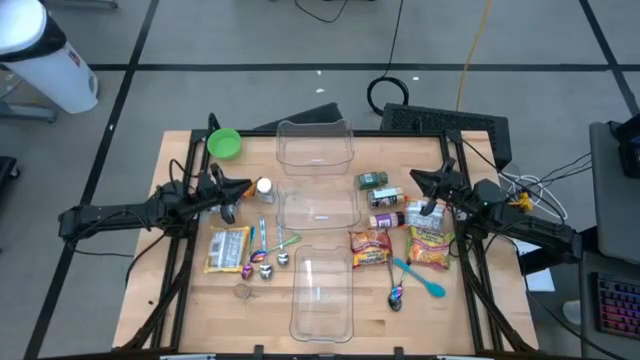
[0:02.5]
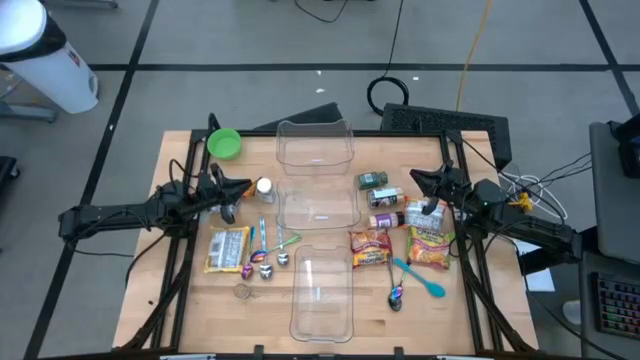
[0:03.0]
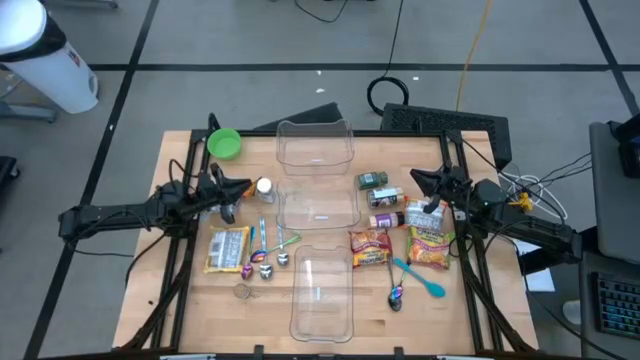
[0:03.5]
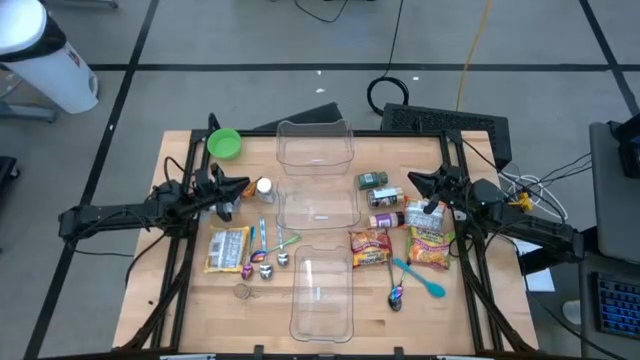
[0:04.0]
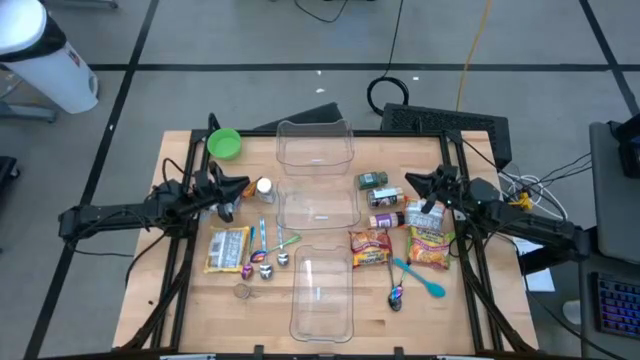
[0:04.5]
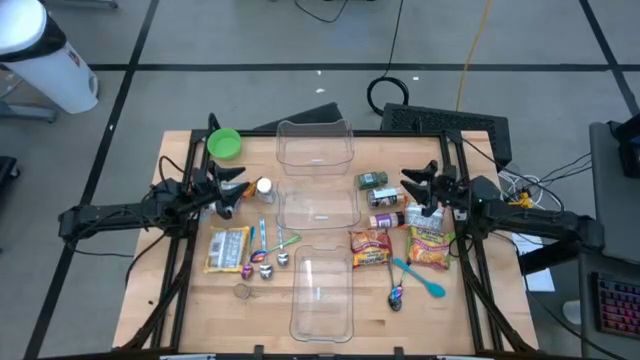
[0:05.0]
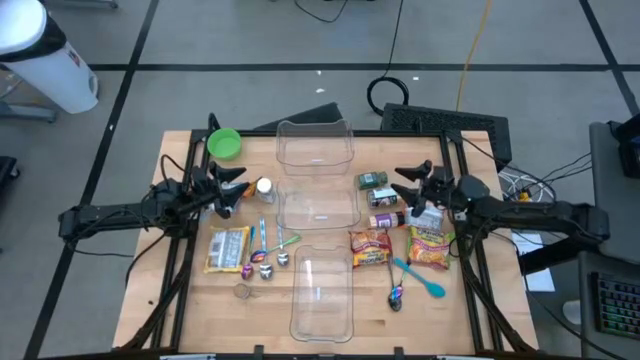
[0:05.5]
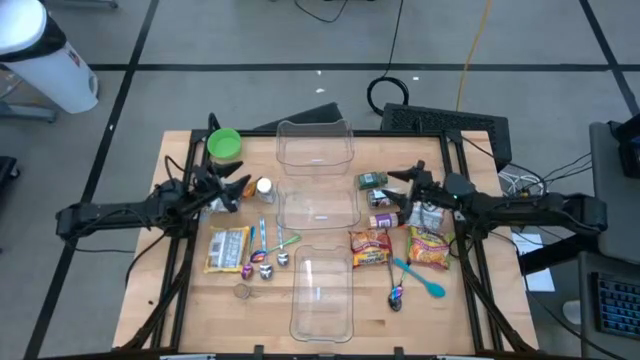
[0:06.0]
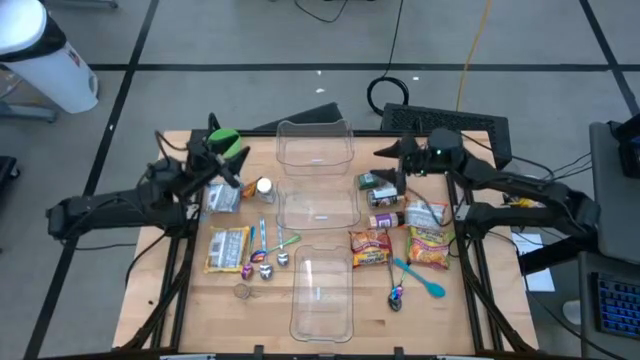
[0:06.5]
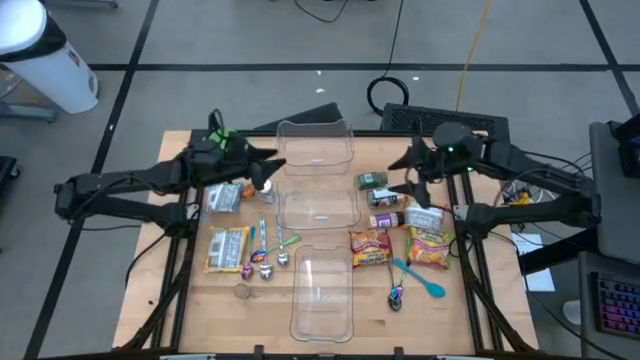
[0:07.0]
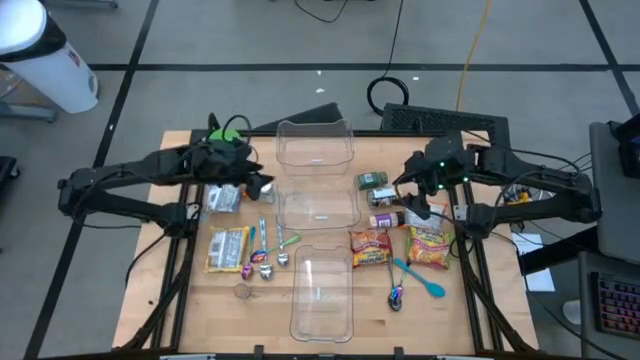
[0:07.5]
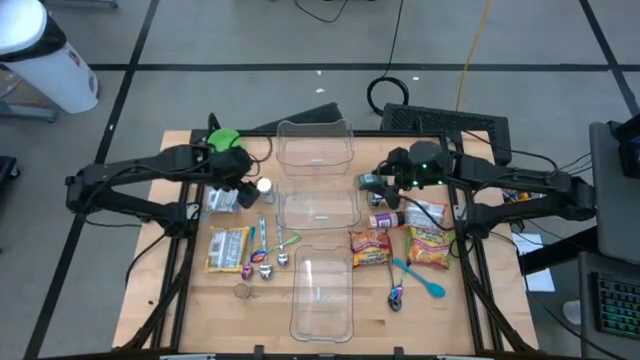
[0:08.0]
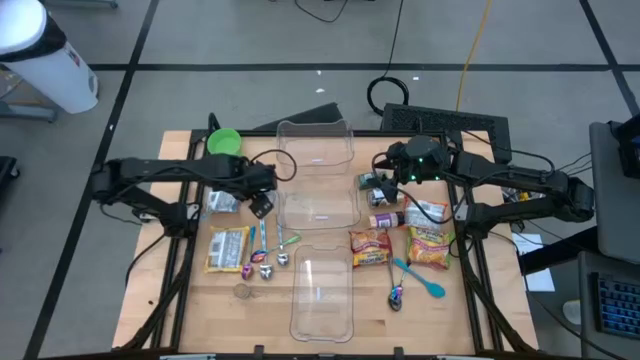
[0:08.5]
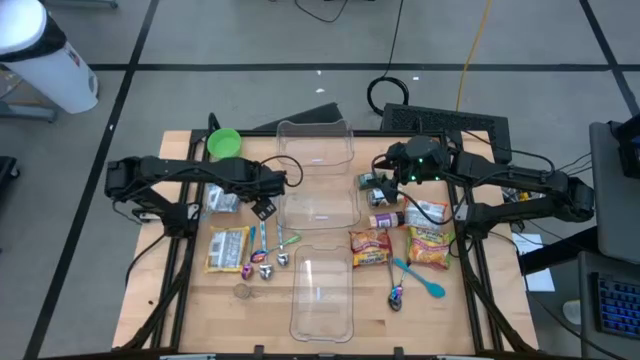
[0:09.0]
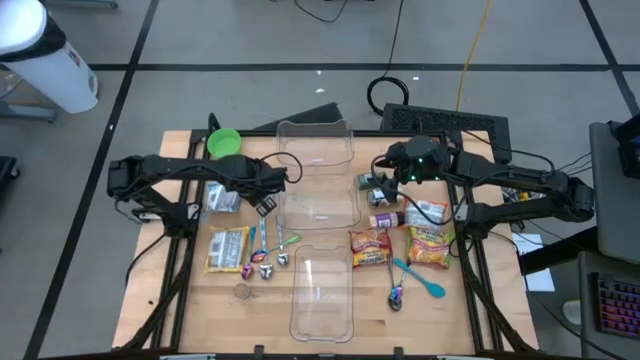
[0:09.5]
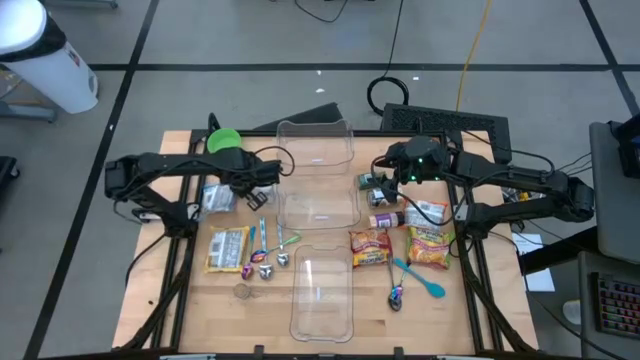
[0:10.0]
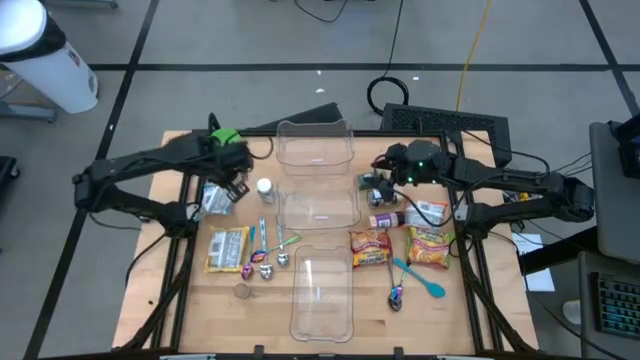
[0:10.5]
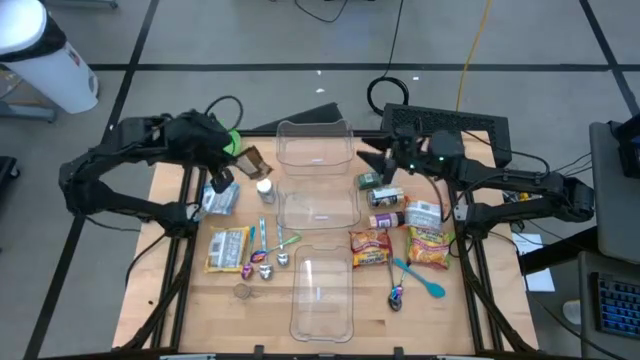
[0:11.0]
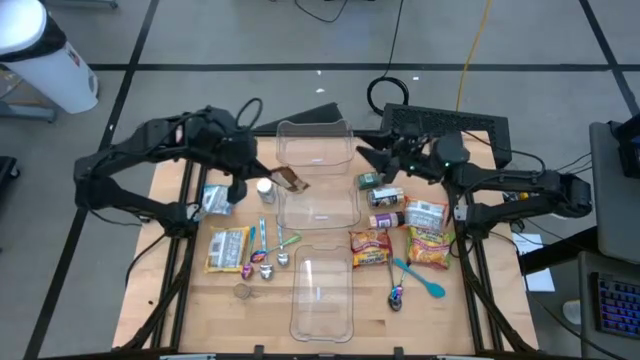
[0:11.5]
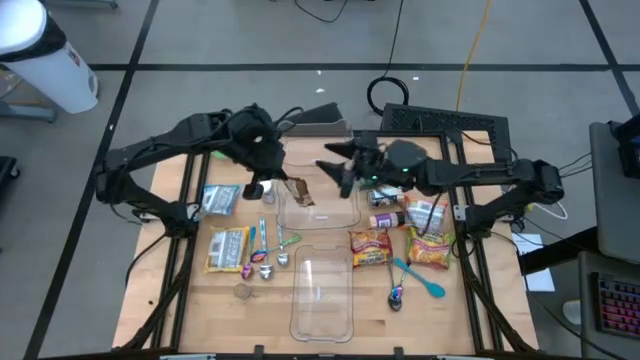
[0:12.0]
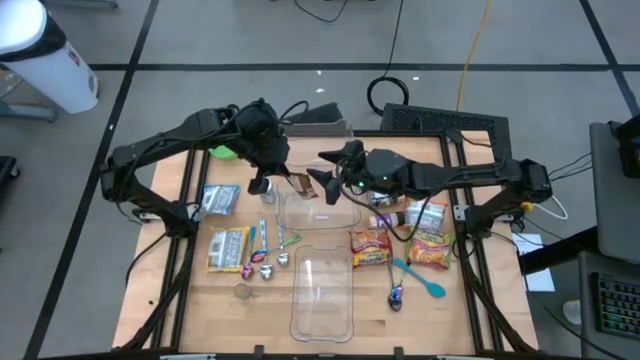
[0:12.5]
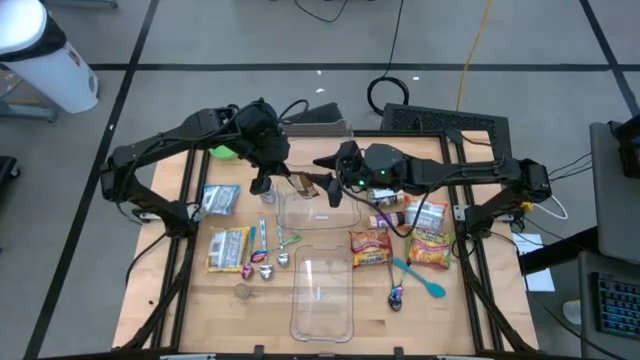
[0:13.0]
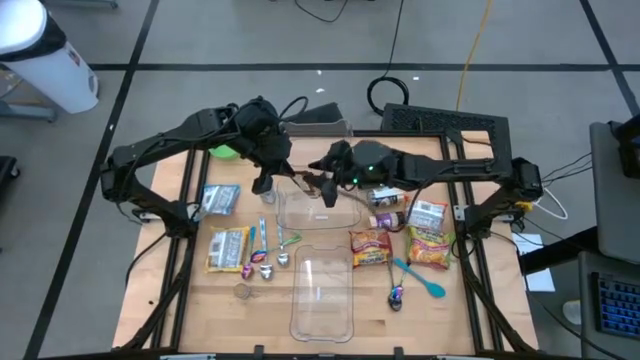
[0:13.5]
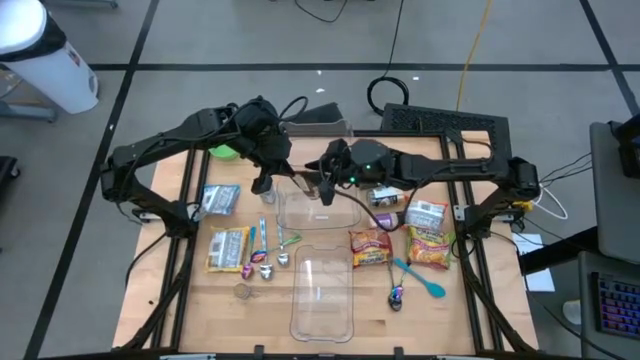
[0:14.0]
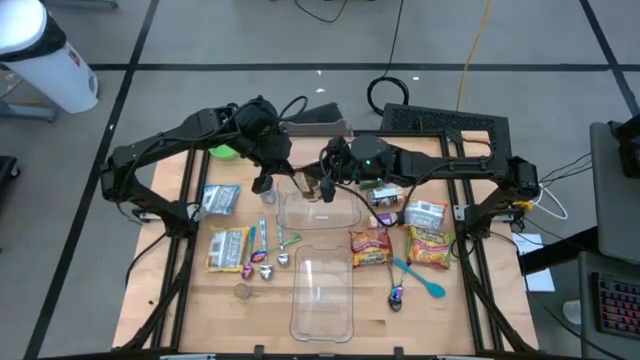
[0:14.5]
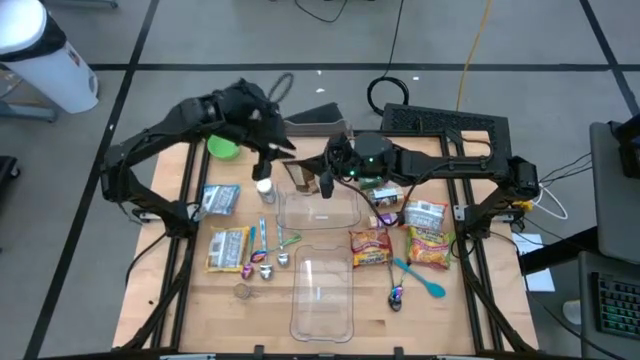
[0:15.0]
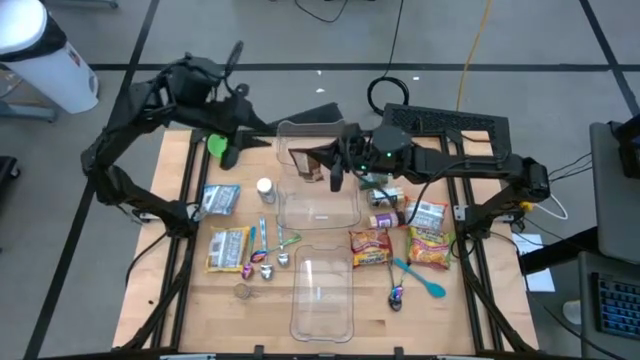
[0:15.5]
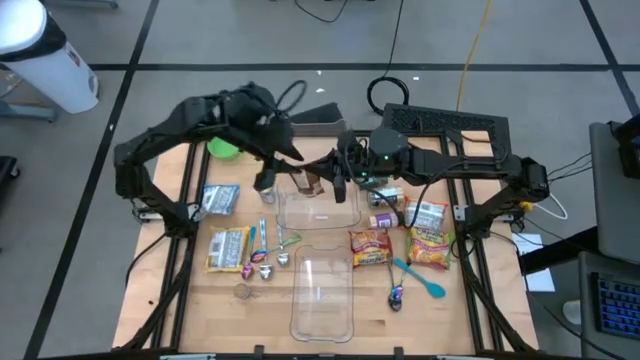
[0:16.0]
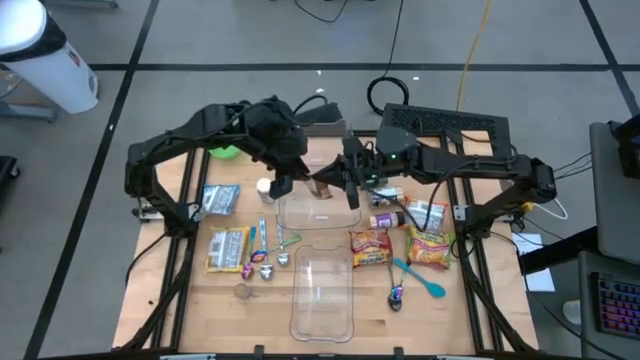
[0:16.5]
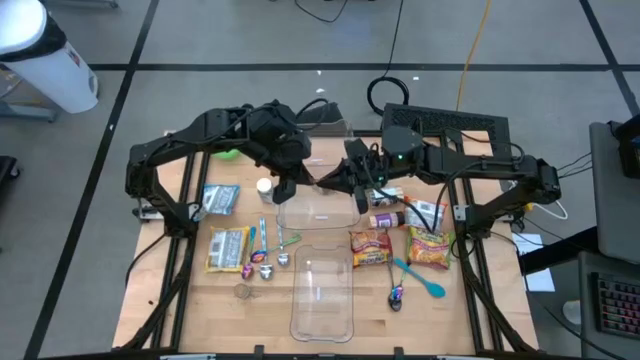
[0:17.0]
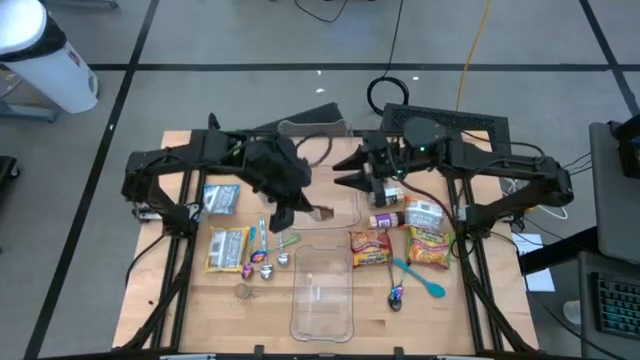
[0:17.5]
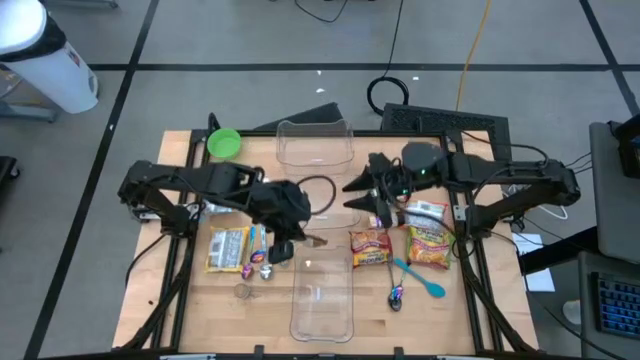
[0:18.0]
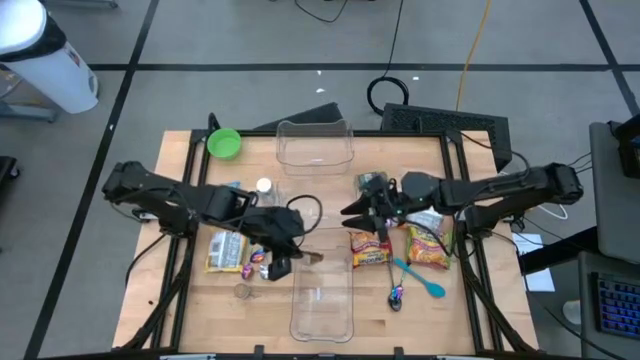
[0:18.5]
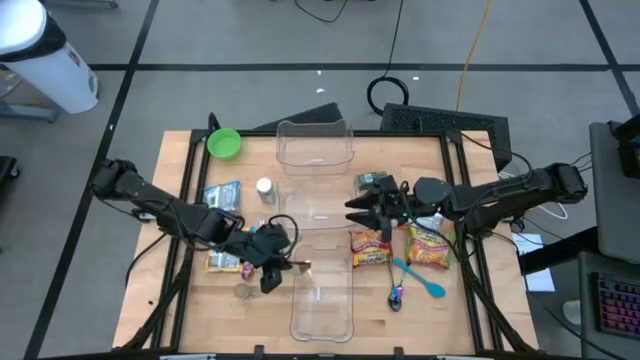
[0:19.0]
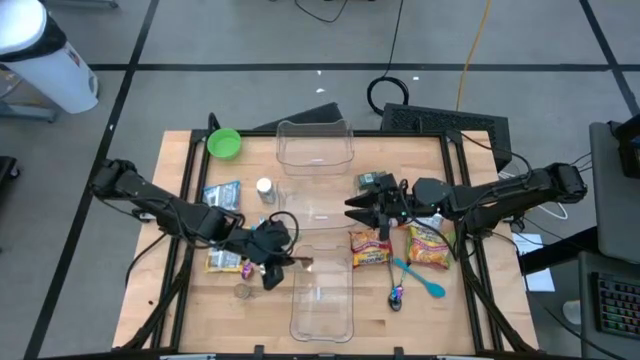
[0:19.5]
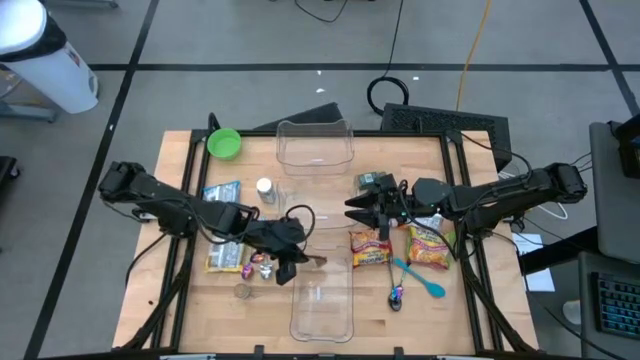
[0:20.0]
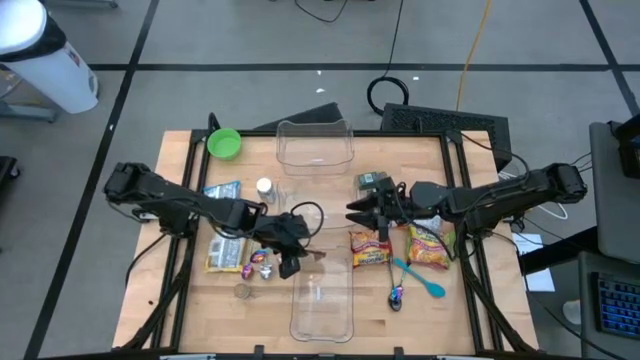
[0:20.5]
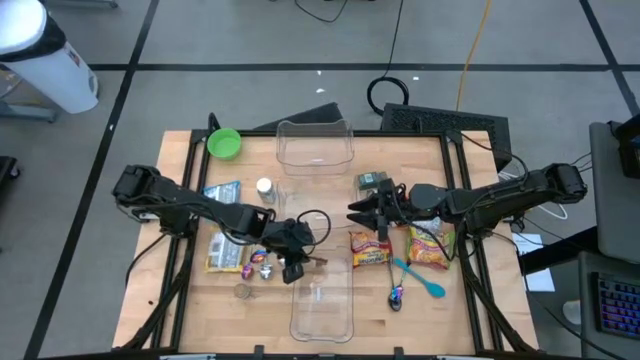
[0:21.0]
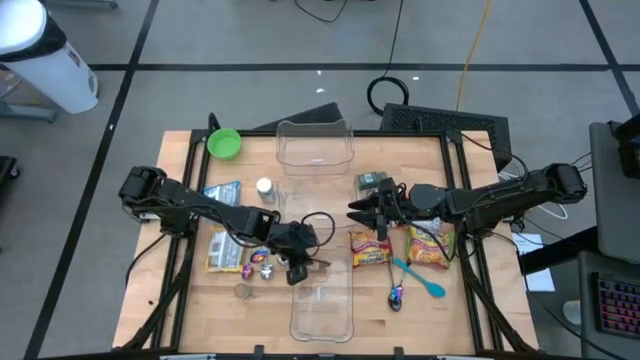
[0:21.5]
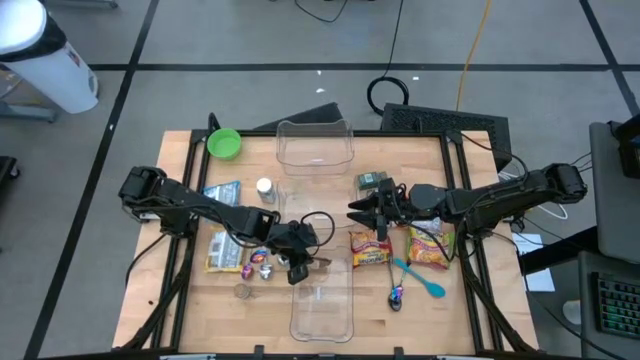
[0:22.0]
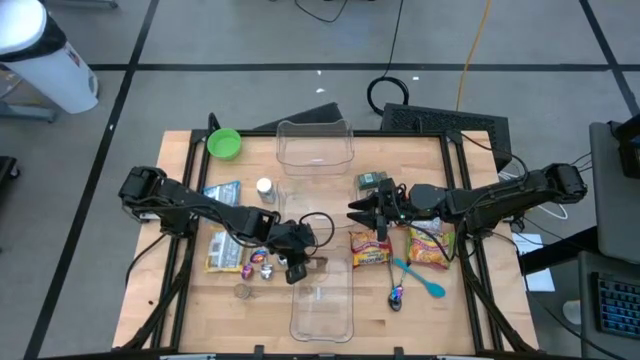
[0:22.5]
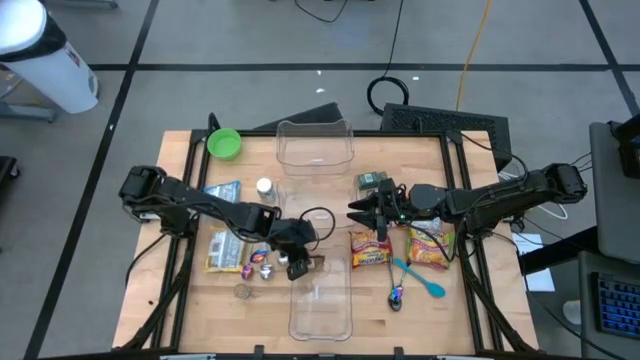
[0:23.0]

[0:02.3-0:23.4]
Task: Pick & Place Food Item
Put the orange seasoning pack into the bottom transparent bin
